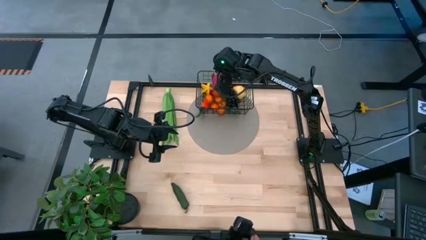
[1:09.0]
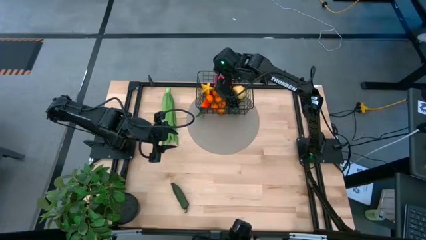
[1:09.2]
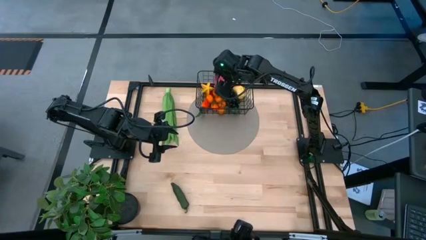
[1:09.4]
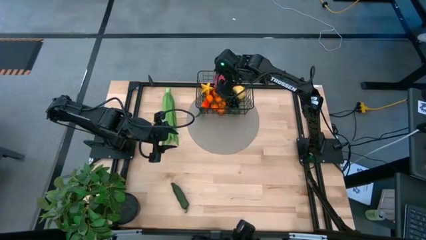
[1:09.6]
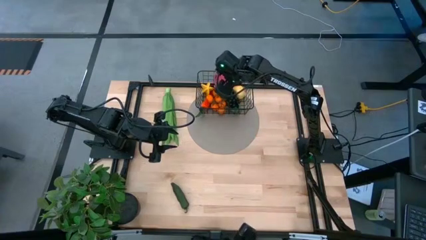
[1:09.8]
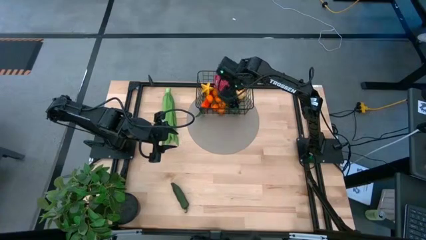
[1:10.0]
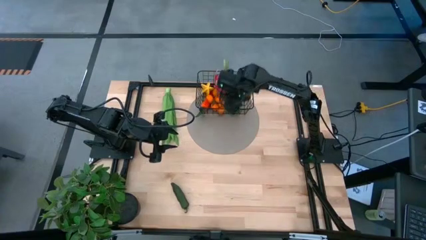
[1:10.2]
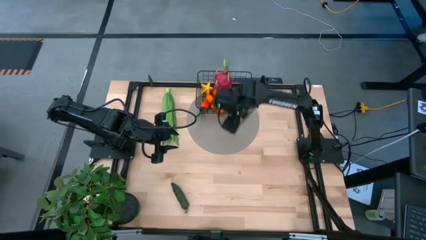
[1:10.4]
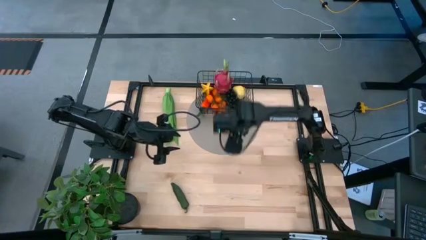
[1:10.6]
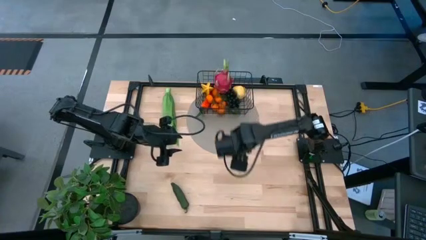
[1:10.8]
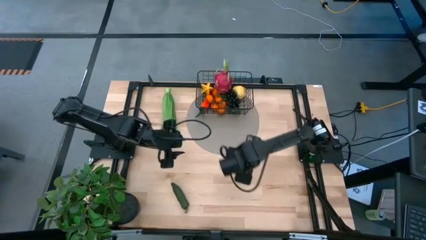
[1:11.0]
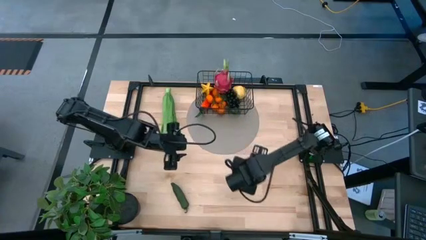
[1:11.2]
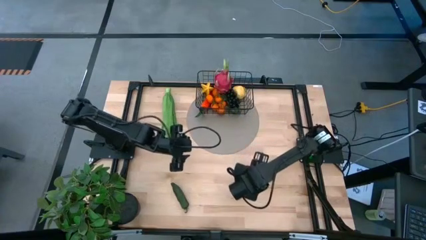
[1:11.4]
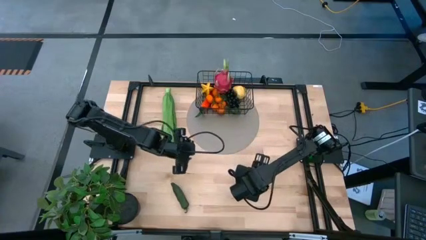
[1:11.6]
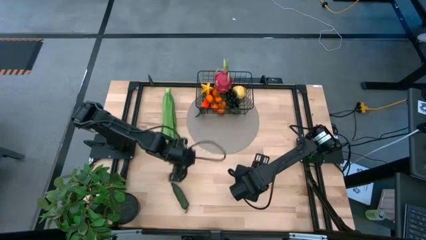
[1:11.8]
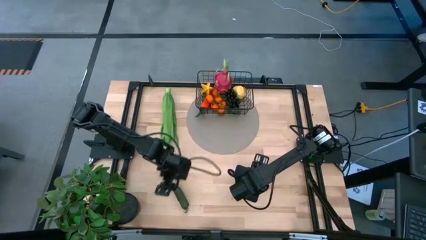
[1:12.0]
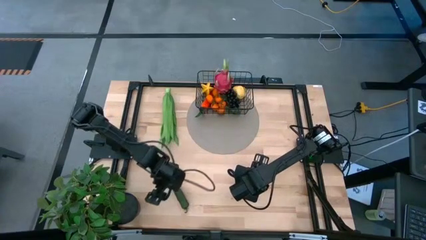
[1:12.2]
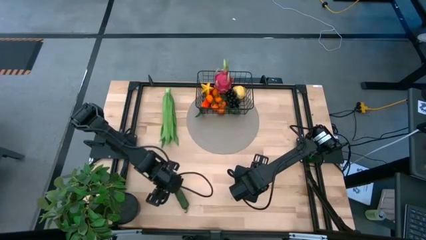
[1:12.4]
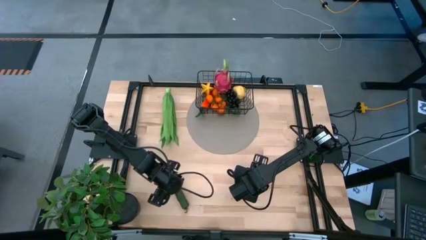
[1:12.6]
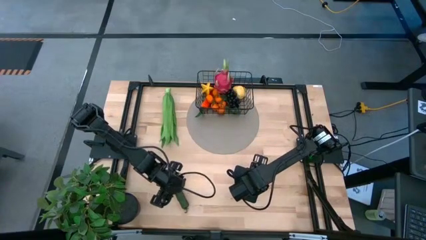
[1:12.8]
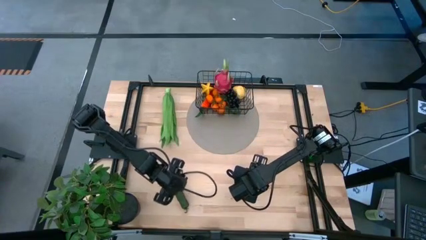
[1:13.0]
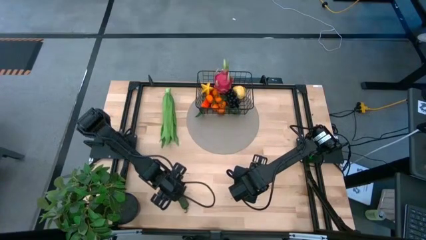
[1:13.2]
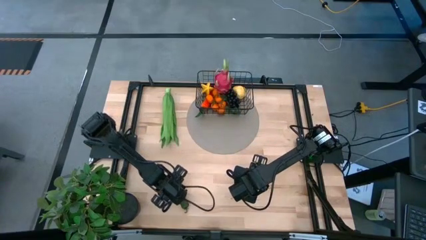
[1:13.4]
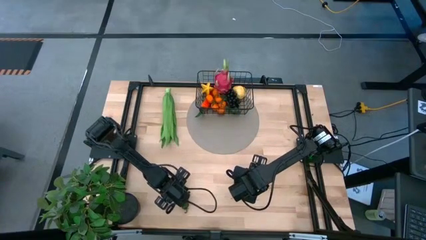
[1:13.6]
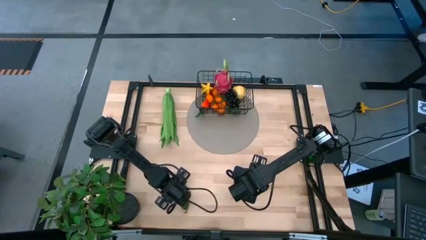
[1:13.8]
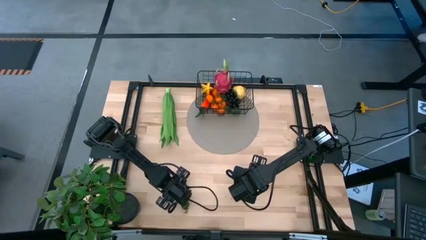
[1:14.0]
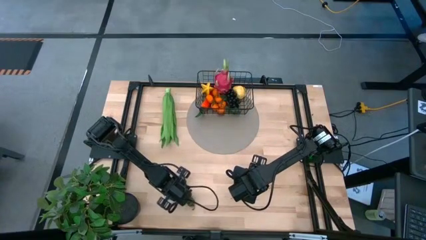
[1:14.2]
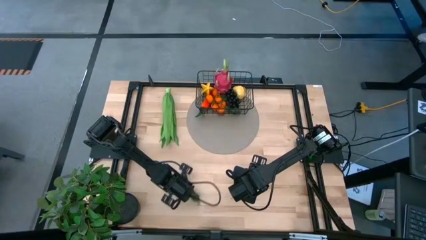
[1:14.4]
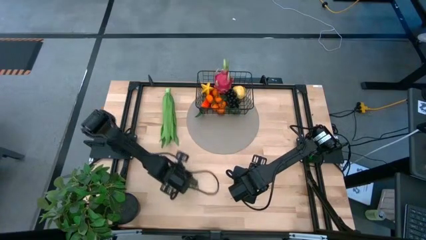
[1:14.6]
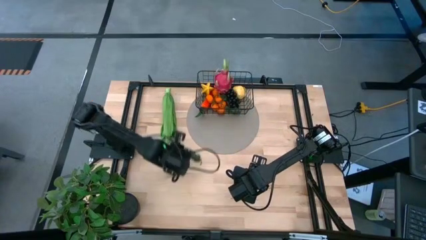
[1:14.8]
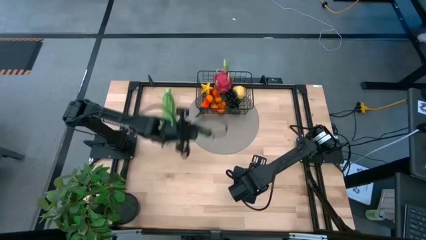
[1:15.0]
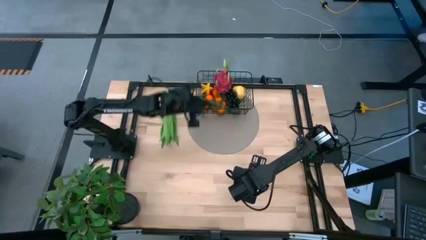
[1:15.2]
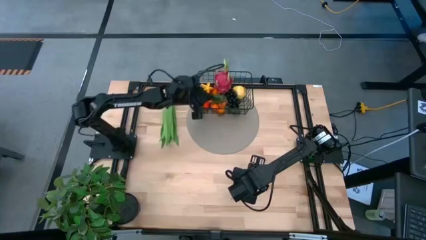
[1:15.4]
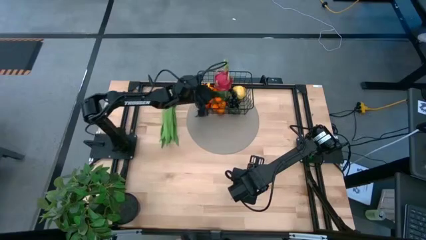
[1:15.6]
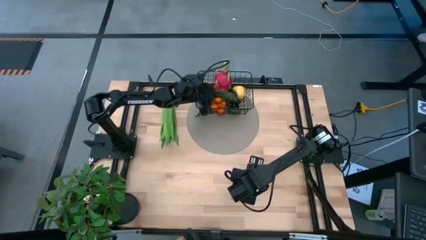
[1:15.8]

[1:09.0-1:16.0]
Task: Build produce basket
Put the green chili pepper into the black wire basket

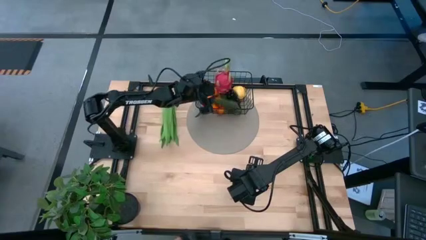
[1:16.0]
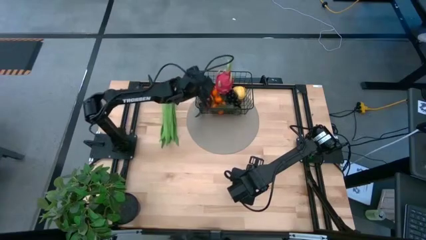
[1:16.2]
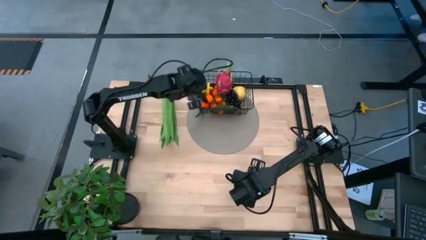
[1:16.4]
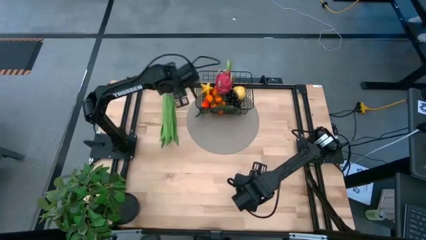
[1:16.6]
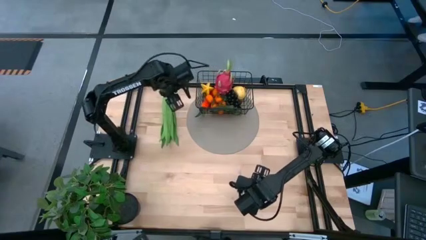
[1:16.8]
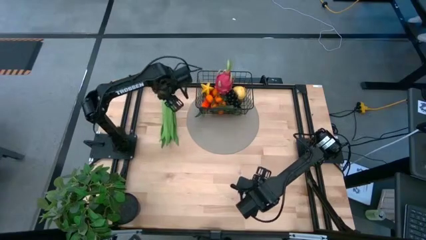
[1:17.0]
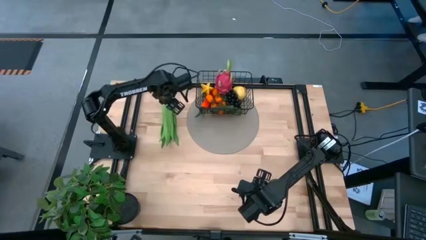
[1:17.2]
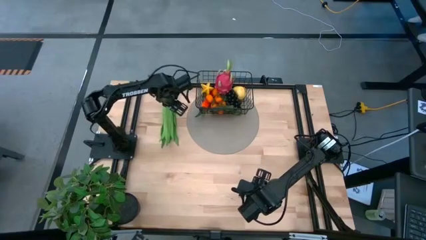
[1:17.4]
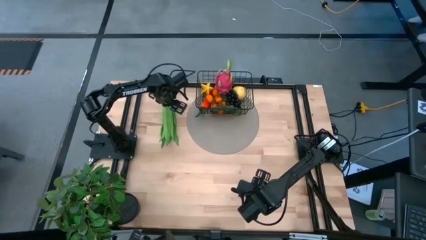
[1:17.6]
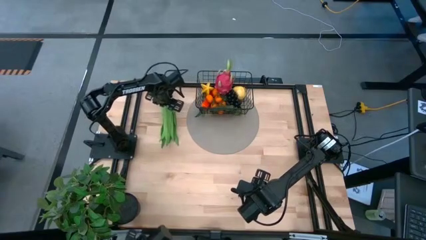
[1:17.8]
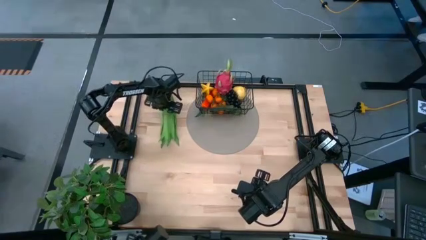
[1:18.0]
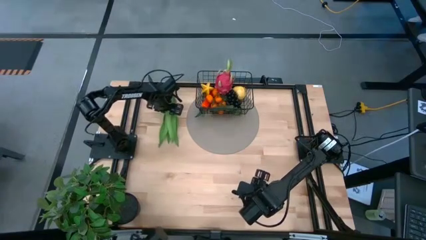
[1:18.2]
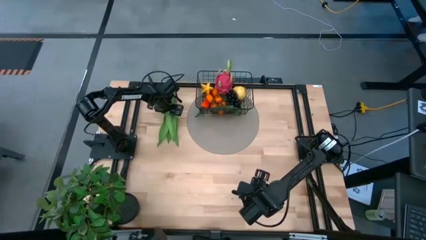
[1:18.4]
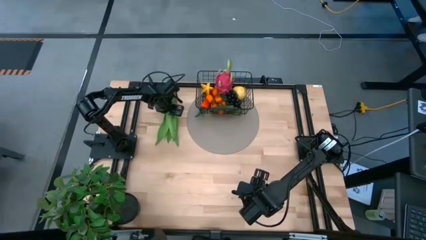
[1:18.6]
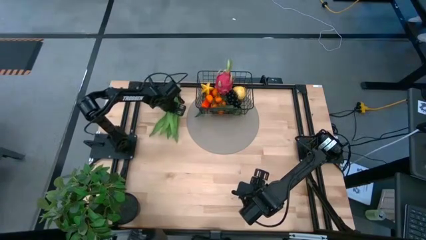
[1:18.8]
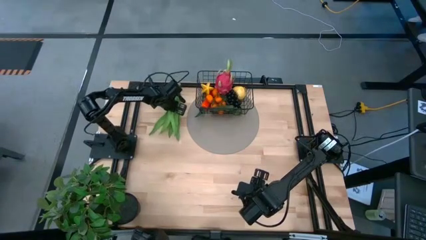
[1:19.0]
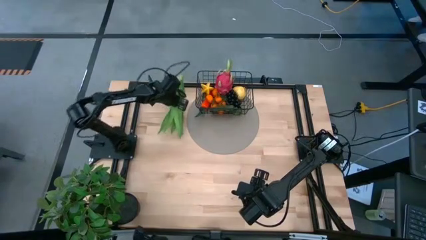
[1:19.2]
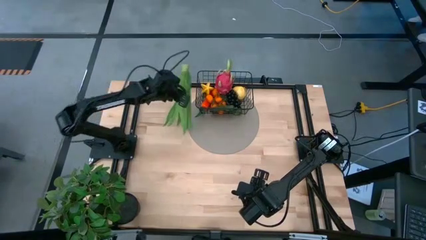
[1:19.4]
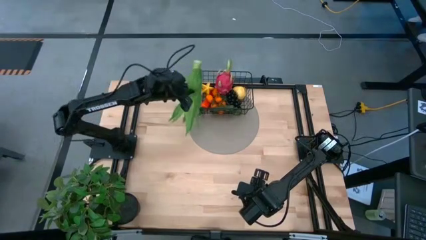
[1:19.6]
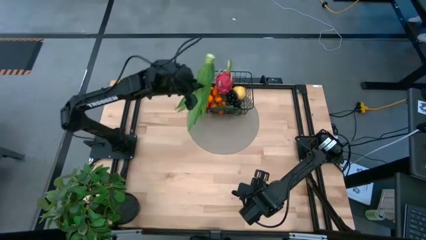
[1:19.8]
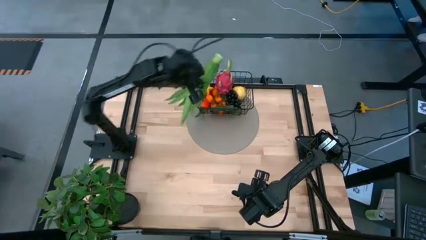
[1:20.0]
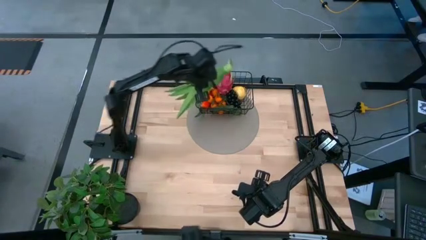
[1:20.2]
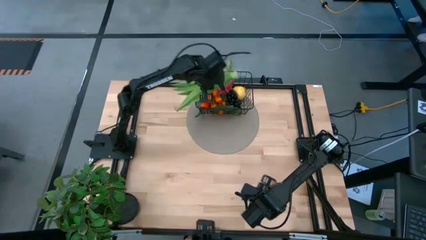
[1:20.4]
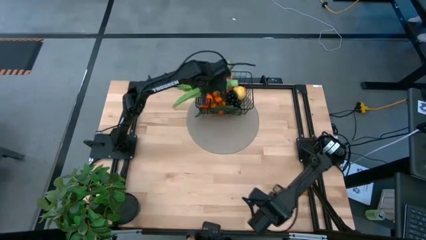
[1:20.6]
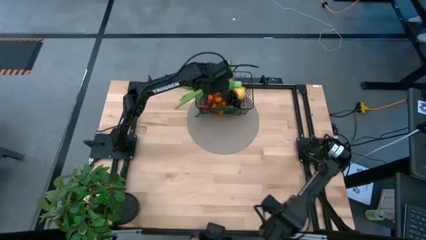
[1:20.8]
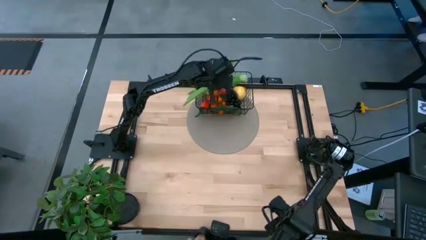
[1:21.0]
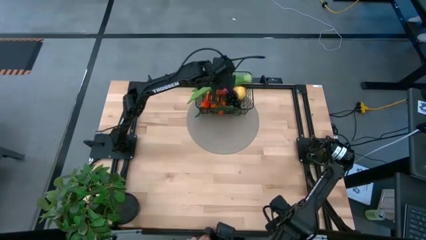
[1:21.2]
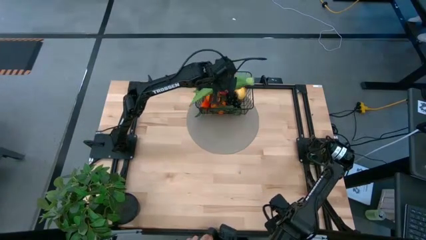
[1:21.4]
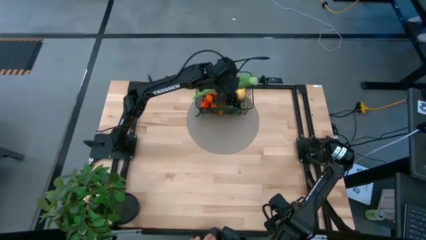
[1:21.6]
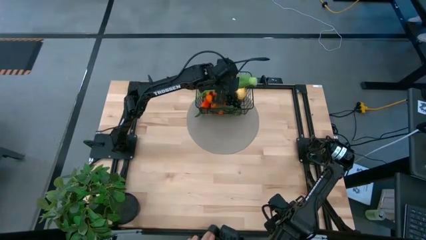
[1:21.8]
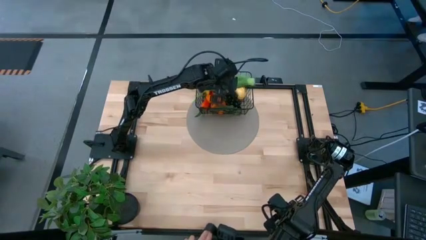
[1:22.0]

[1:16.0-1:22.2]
Put the leaf lettuce into the black wire basket

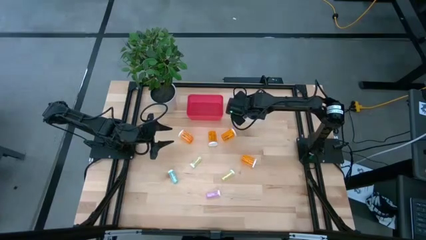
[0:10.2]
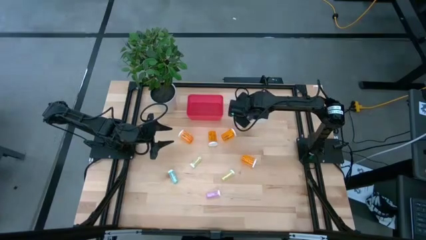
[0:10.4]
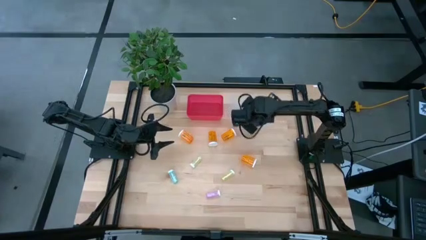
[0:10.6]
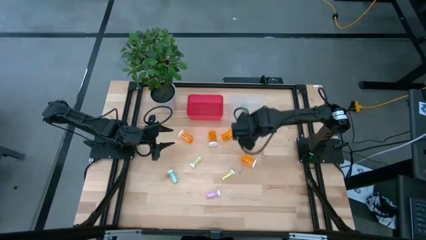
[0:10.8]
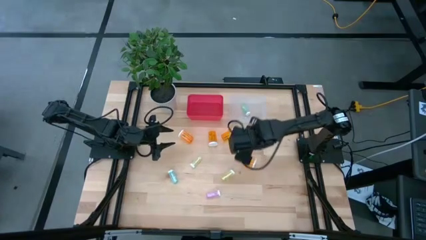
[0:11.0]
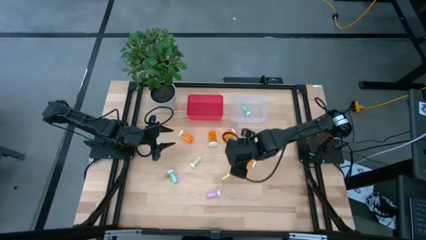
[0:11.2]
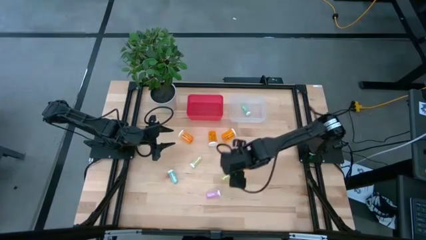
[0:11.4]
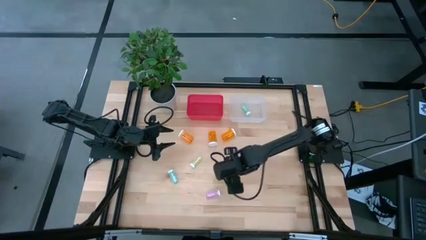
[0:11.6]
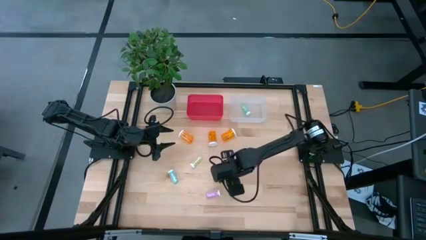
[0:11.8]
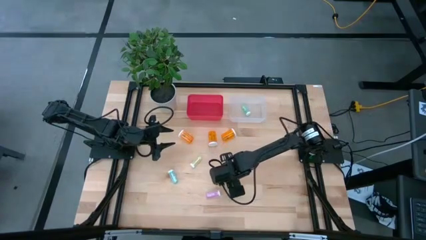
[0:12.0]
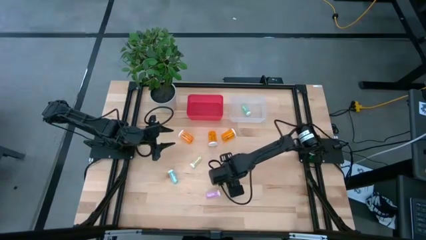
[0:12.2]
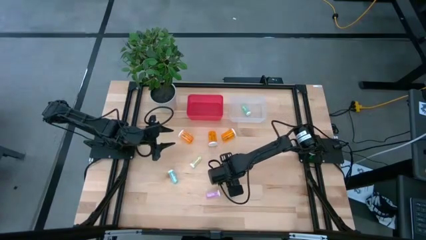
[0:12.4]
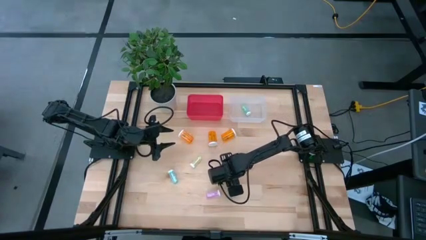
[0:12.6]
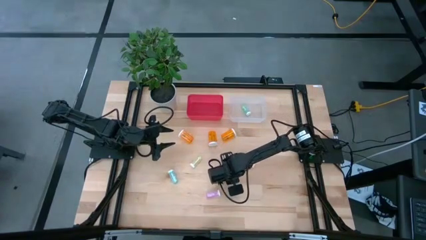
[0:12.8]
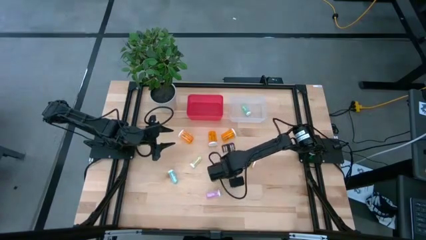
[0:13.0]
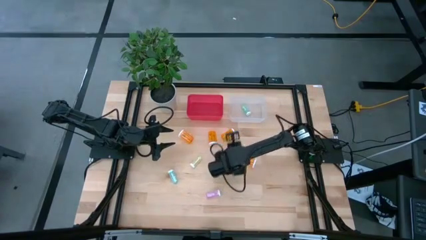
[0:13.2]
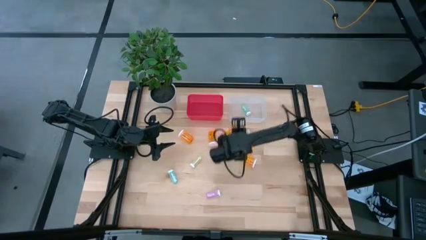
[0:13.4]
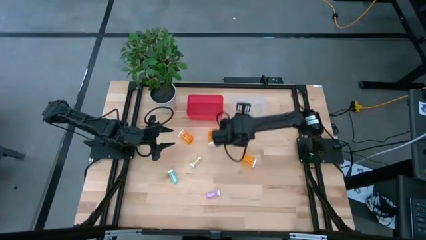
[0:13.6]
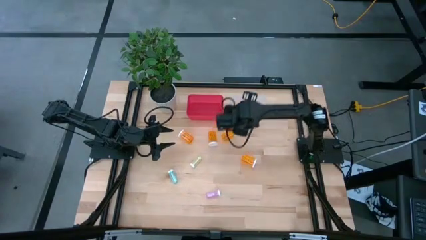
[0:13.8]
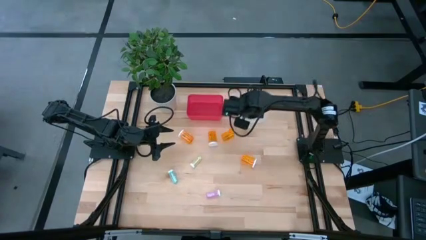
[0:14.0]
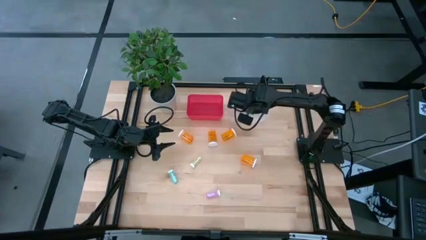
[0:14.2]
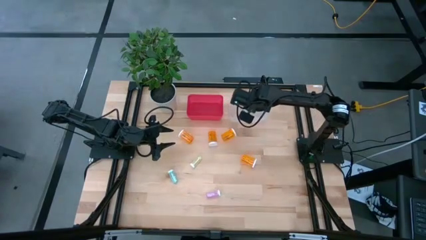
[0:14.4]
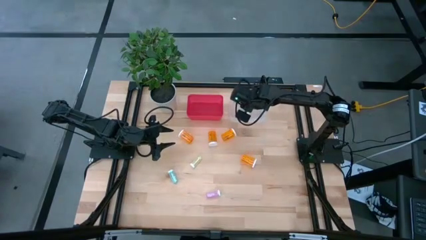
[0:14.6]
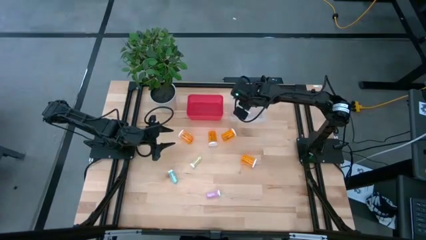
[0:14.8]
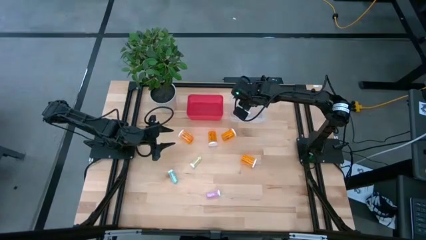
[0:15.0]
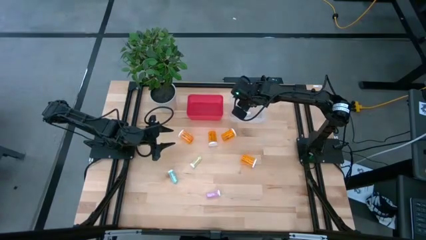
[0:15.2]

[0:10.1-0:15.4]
Task: Pick and place medicine bottles into bin by pill shape (circle, oval)
Put the green tablet bottle into the transparent bin
